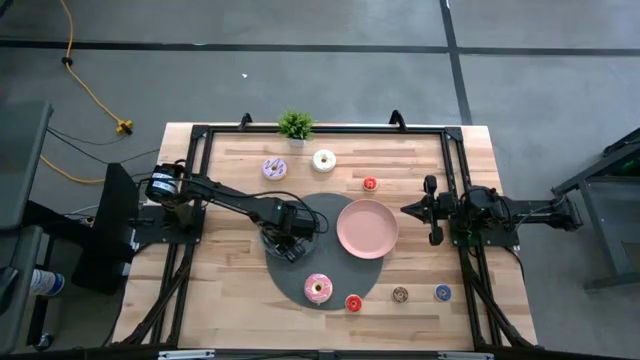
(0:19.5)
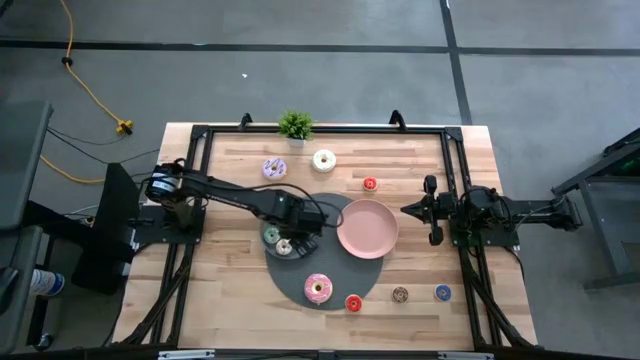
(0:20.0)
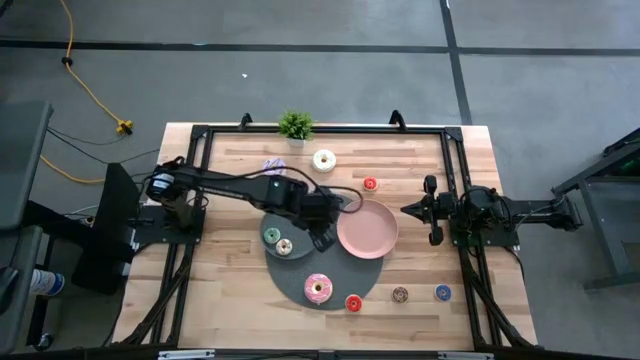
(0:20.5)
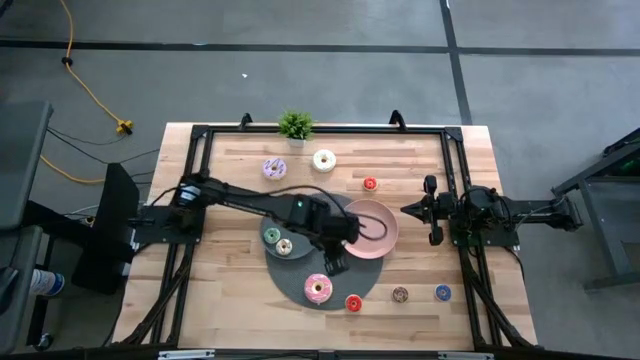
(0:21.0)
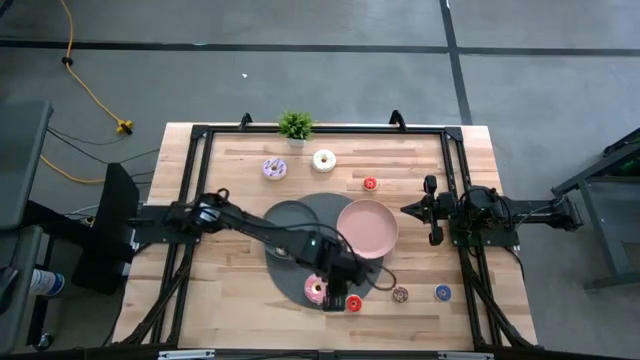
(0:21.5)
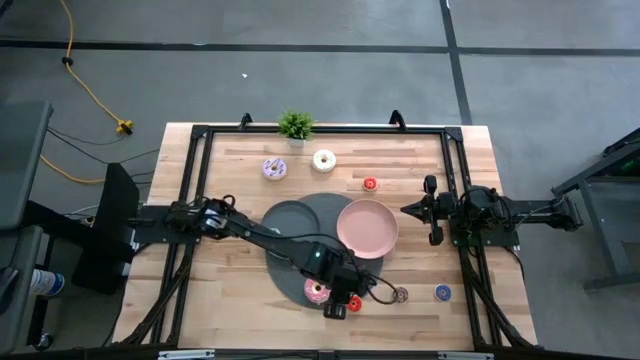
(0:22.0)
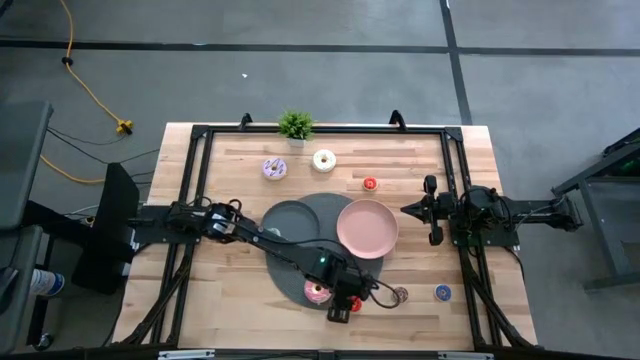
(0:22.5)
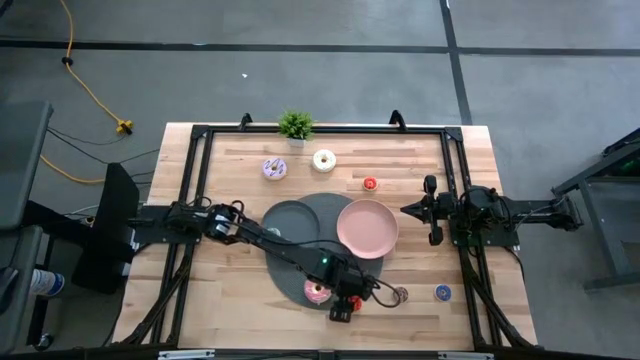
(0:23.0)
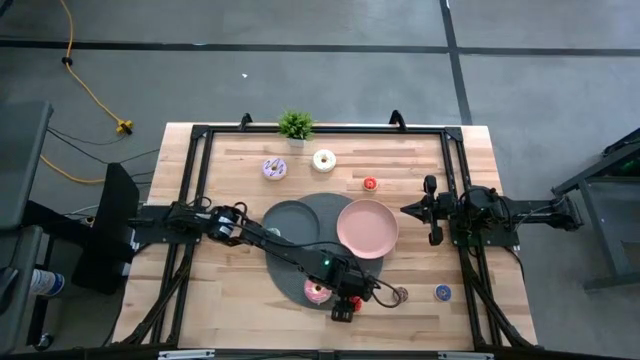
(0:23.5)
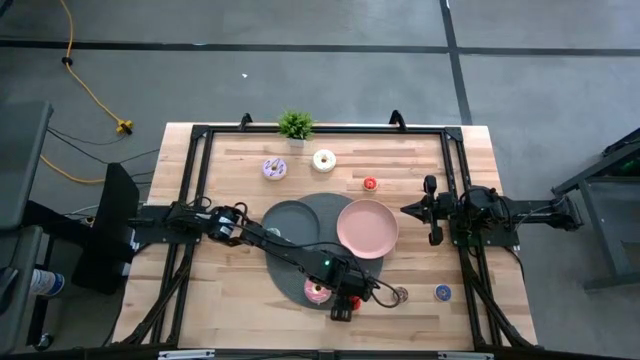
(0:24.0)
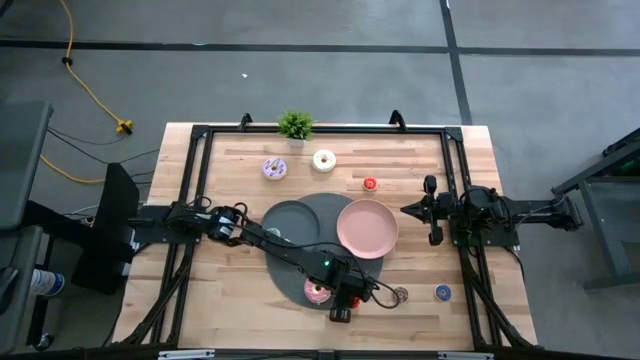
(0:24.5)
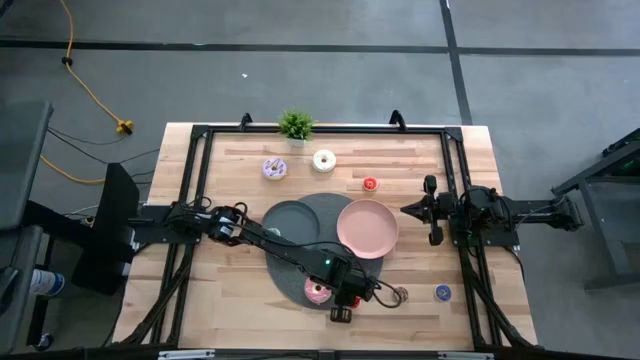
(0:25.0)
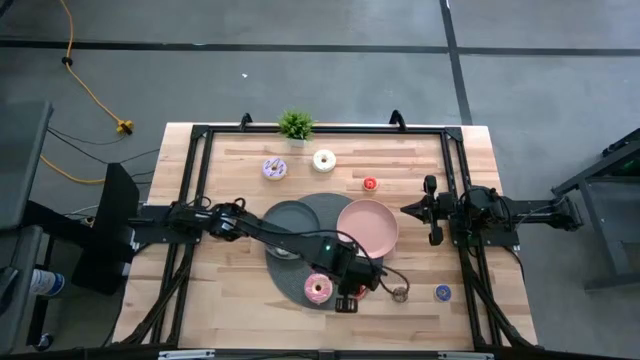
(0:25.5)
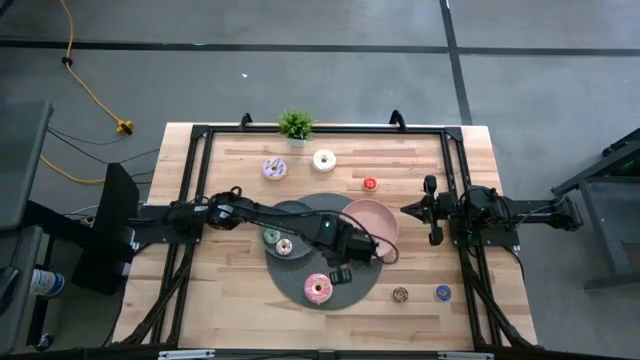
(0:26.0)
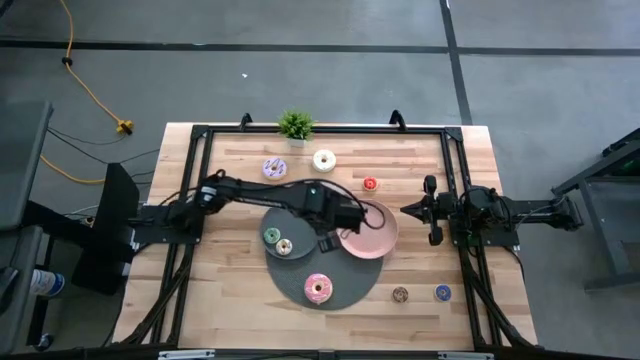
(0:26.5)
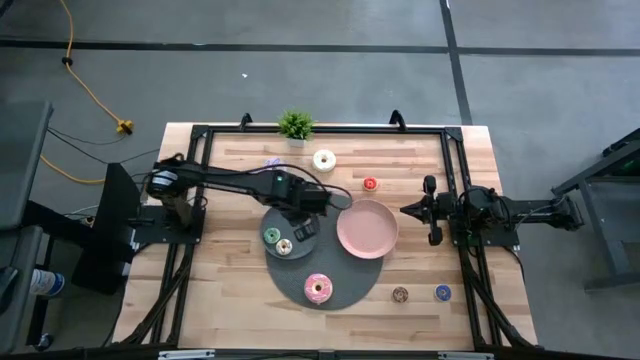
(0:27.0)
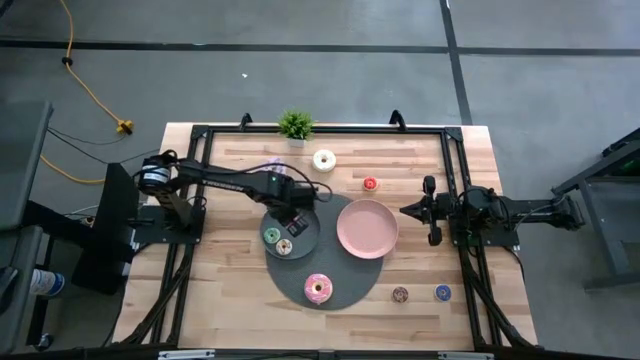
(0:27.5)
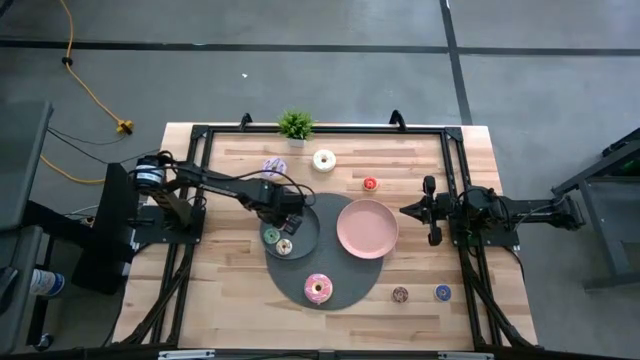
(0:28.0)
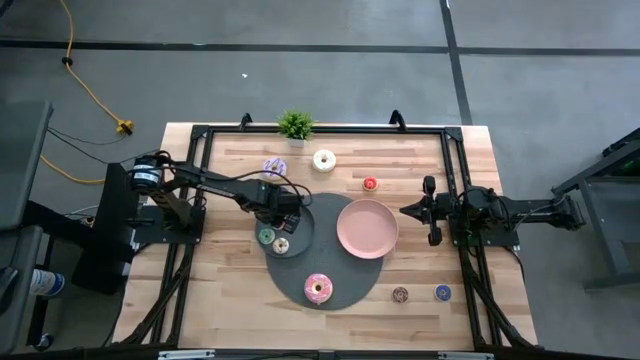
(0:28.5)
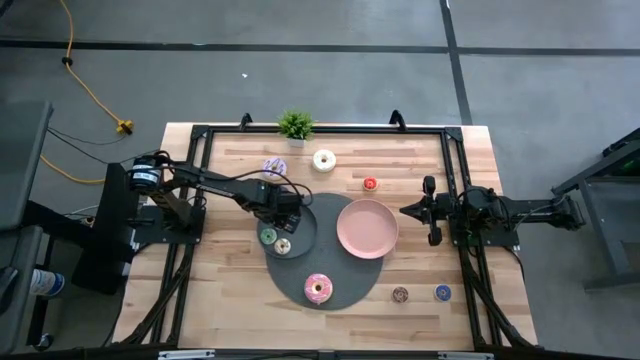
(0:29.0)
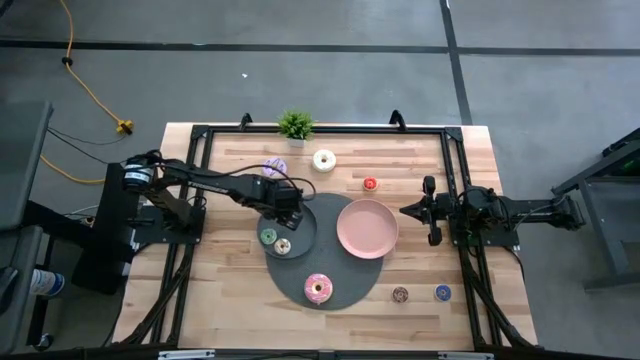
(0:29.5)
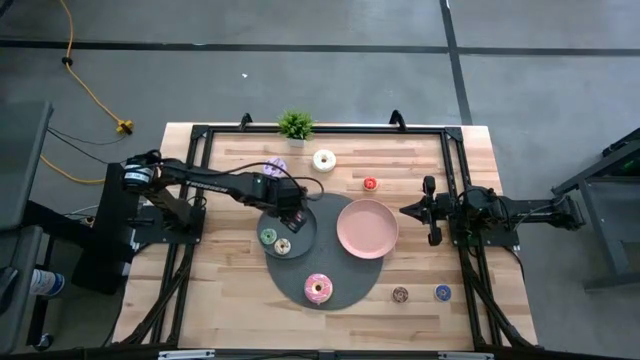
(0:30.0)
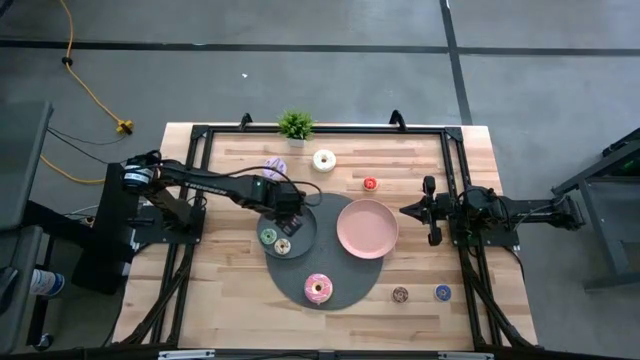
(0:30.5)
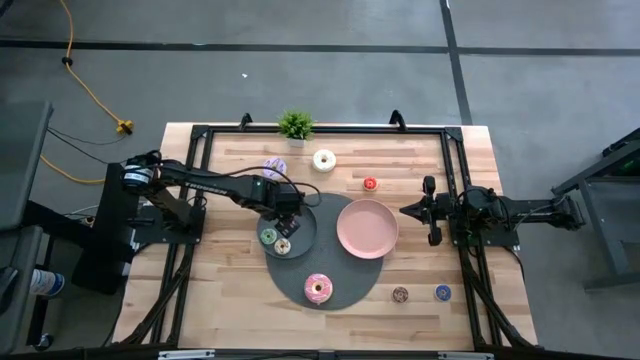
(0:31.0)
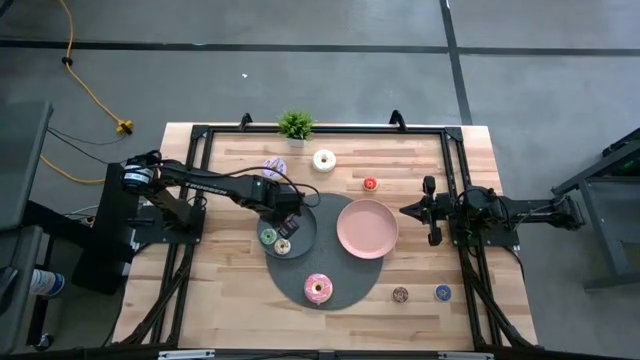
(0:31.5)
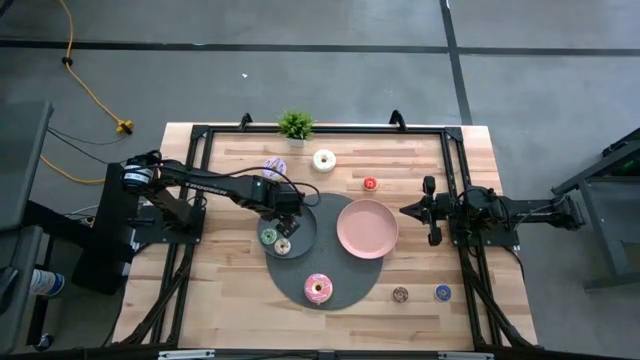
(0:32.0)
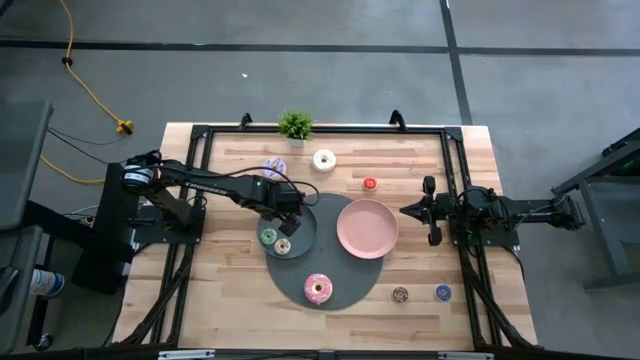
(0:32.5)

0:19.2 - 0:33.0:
Task: Pick & Place donuts
Put the small red donut on the gray plate

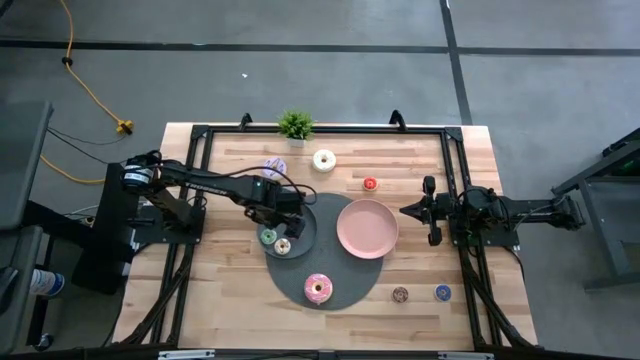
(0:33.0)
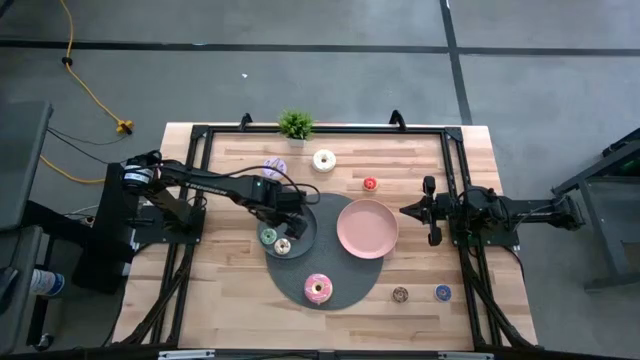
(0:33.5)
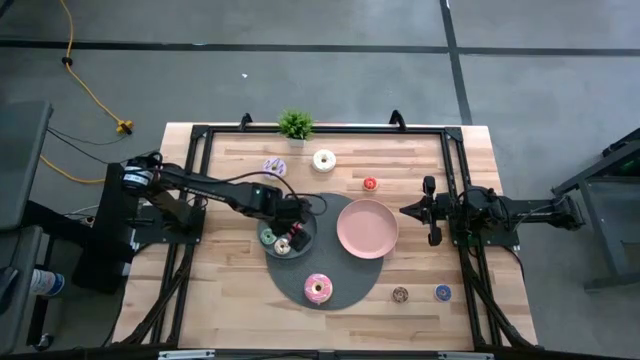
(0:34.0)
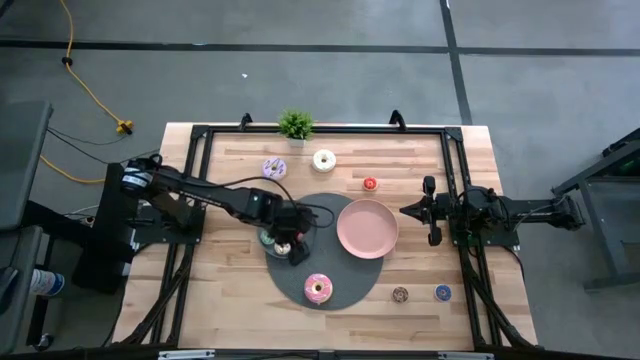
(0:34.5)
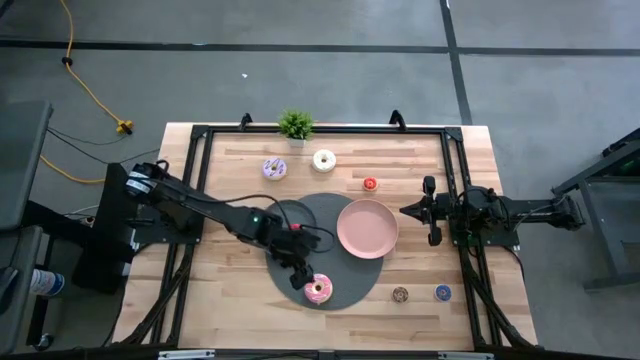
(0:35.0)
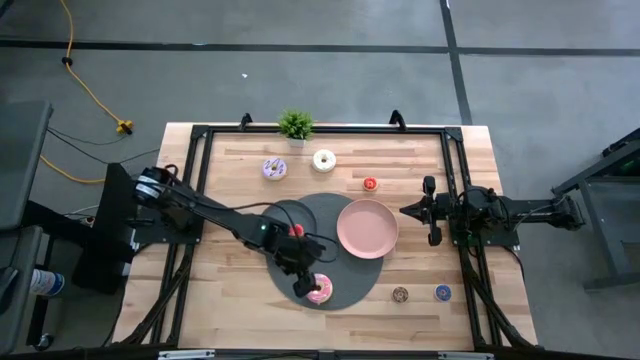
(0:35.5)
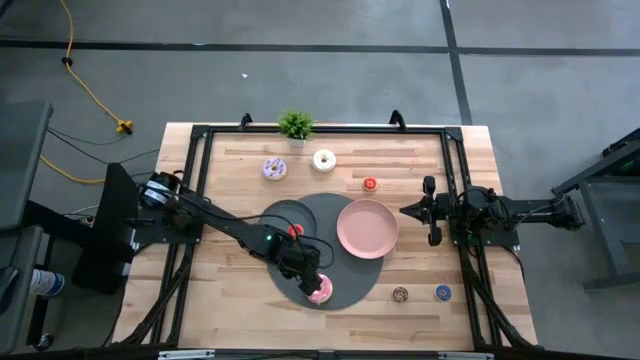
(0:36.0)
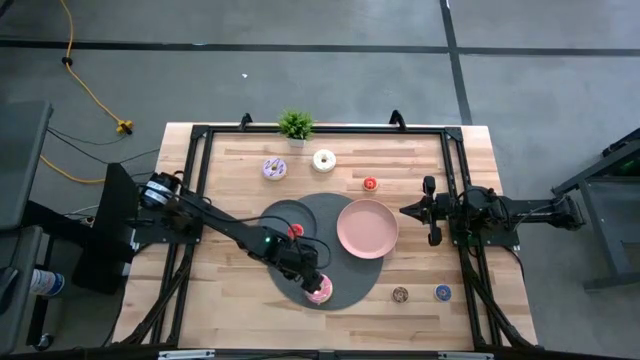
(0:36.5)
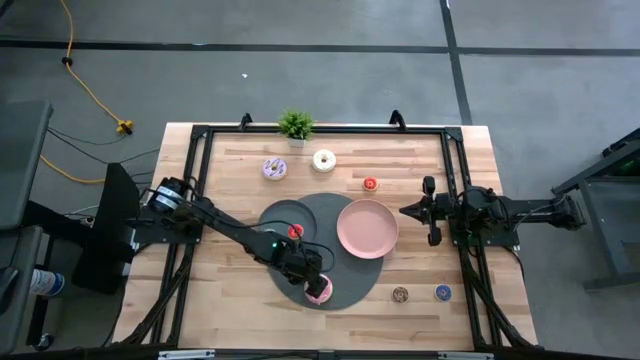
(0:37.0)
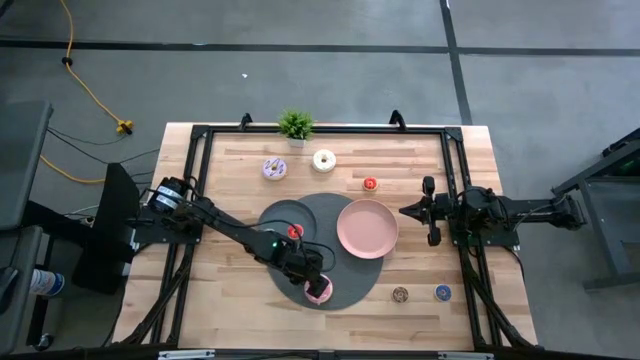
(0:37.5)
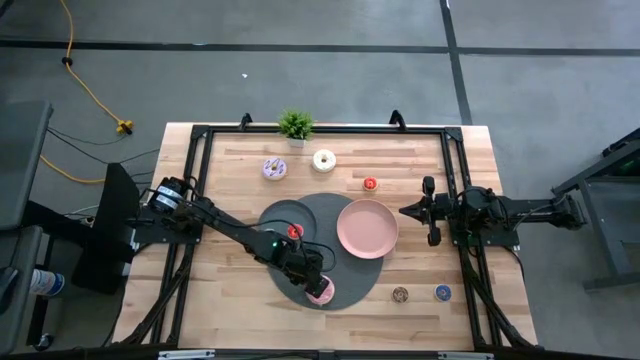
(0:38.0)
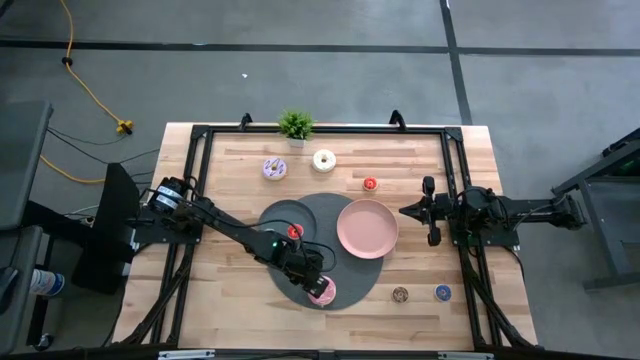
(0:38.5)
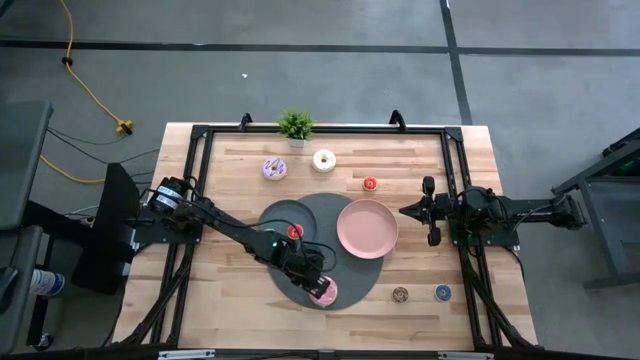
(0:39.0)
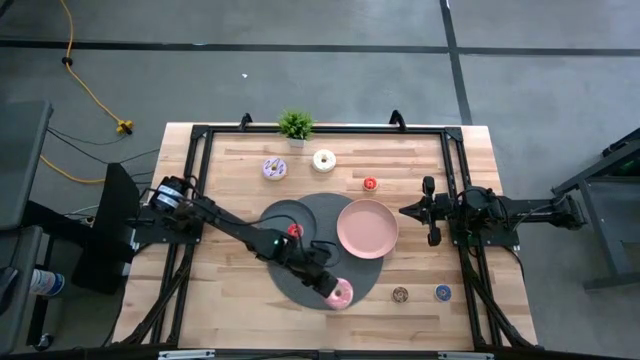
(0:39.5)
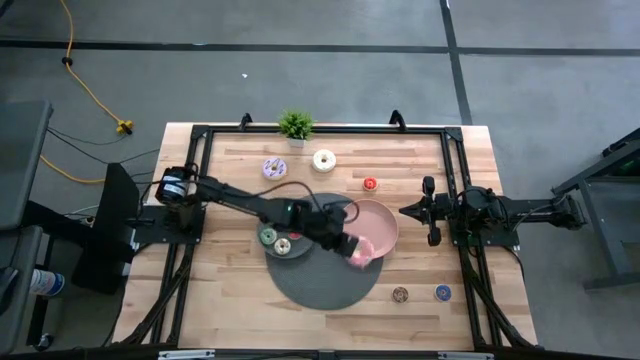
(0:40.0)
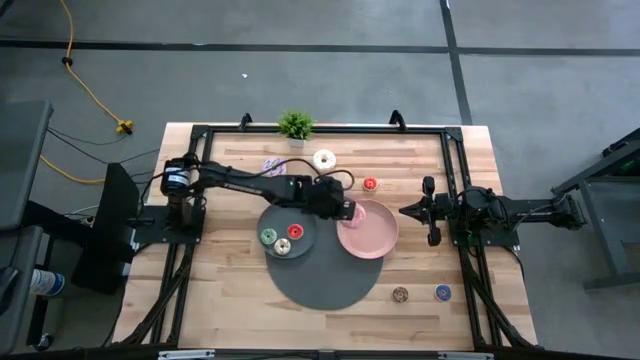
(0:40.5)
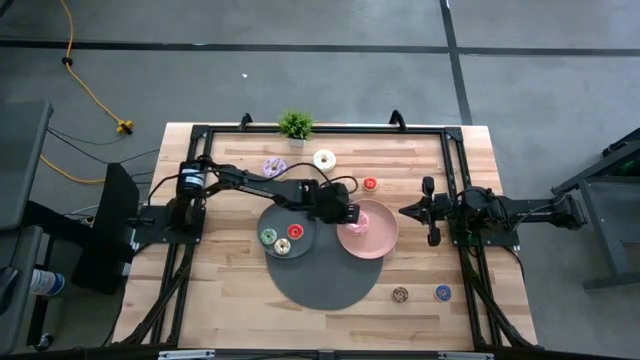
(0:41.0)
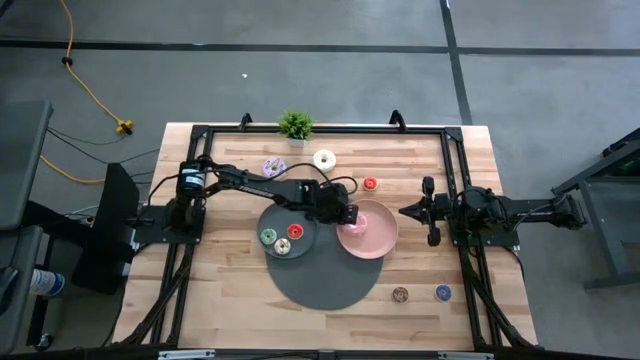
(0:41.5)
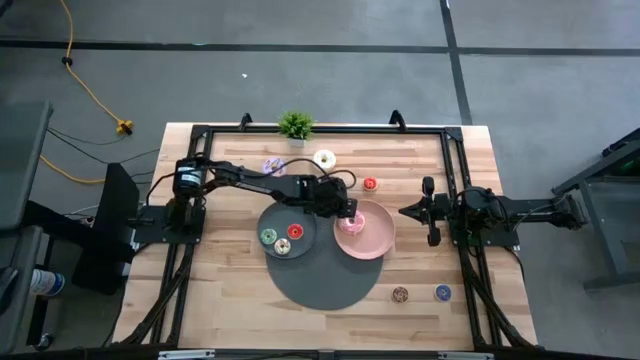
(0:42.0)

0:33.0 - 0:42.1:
Put the big pink donut on the pink plate
